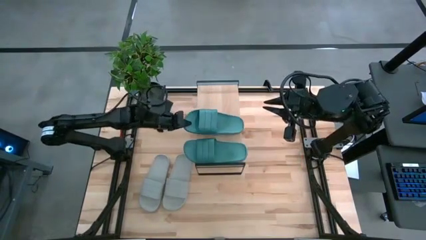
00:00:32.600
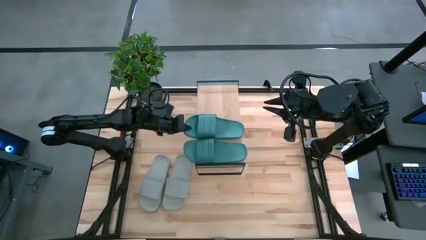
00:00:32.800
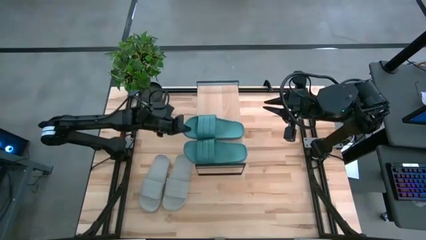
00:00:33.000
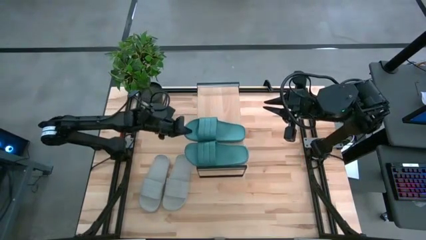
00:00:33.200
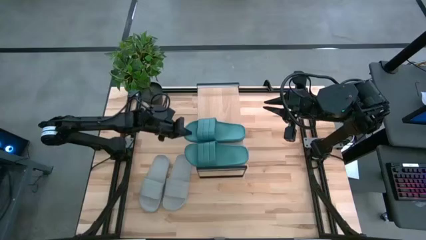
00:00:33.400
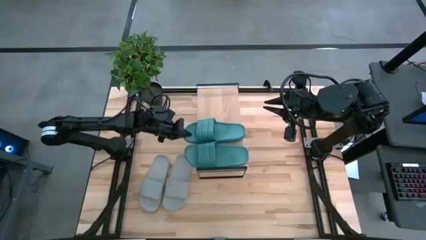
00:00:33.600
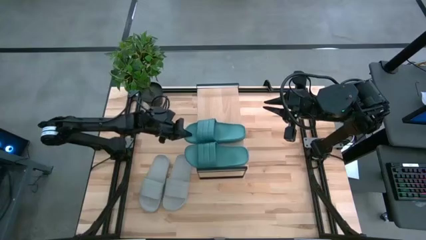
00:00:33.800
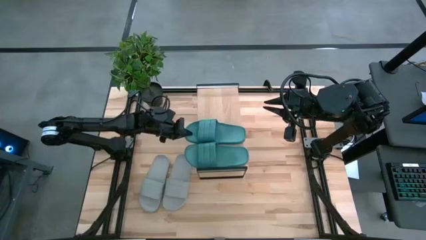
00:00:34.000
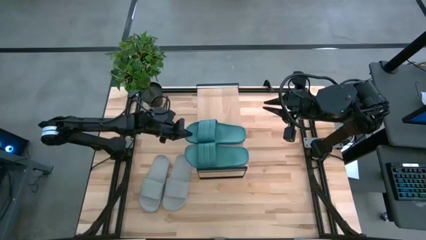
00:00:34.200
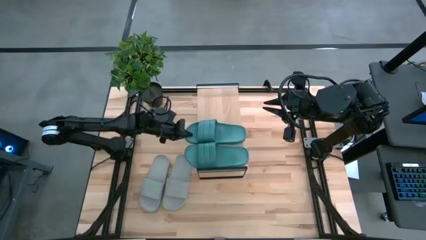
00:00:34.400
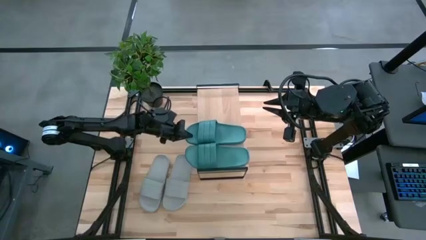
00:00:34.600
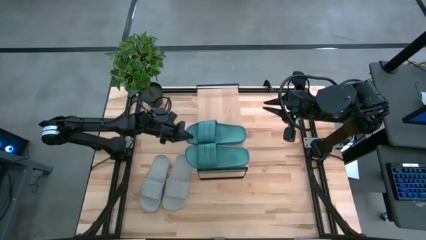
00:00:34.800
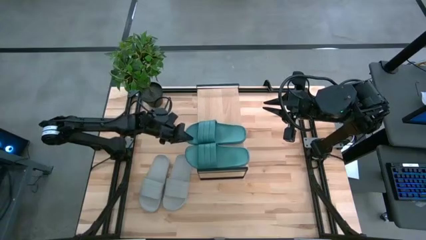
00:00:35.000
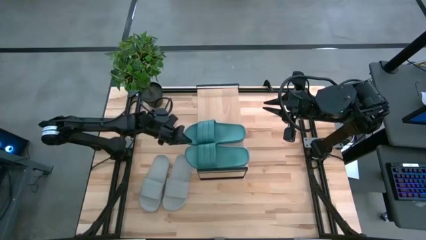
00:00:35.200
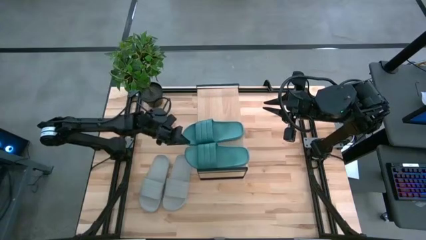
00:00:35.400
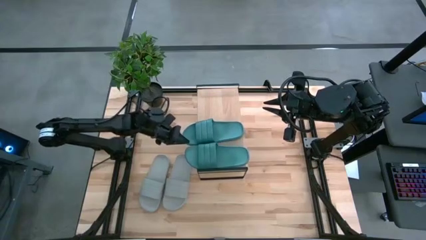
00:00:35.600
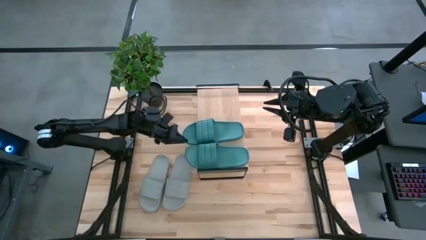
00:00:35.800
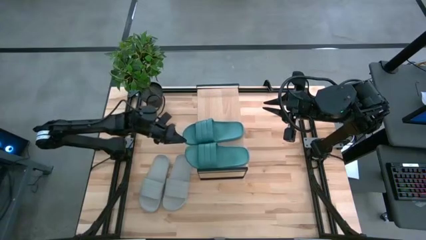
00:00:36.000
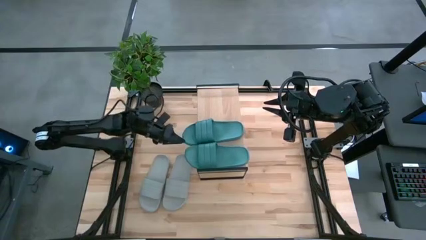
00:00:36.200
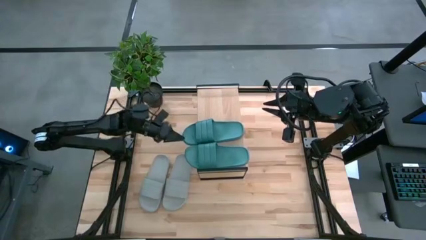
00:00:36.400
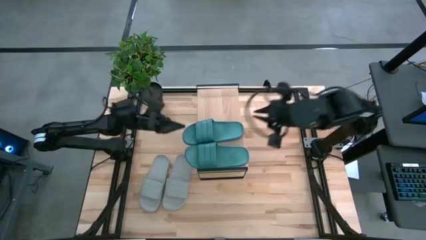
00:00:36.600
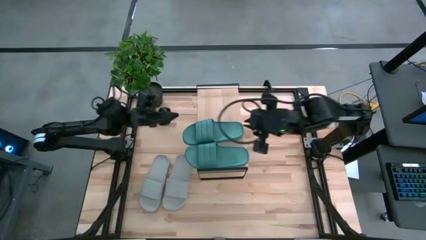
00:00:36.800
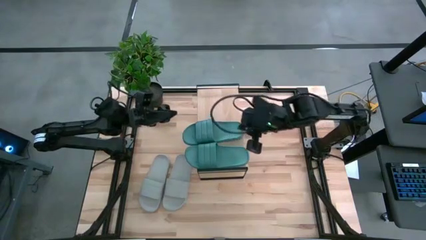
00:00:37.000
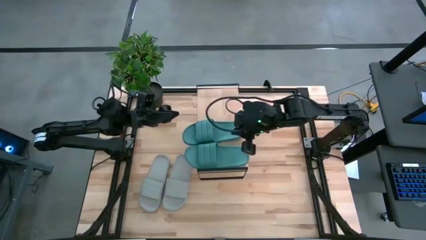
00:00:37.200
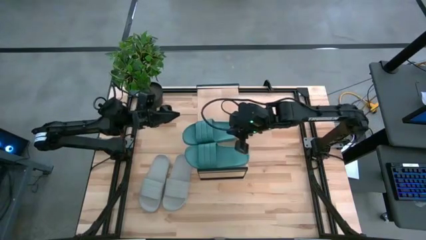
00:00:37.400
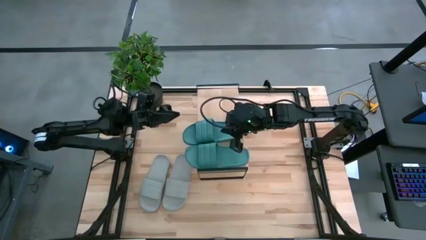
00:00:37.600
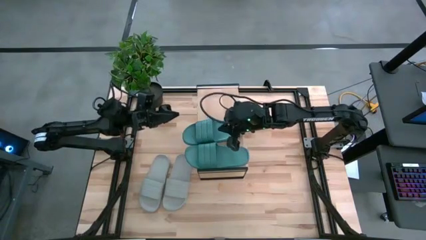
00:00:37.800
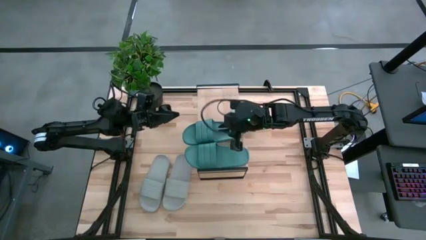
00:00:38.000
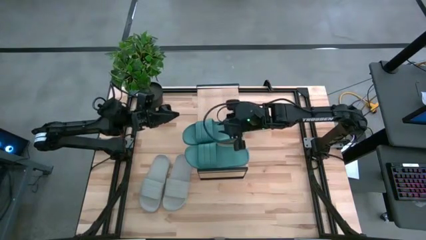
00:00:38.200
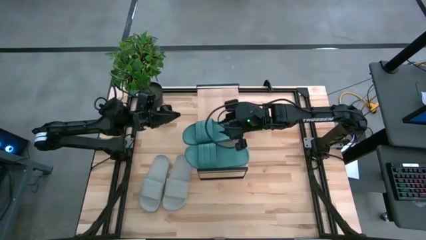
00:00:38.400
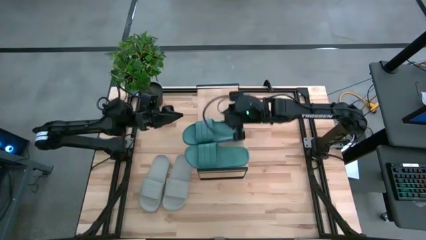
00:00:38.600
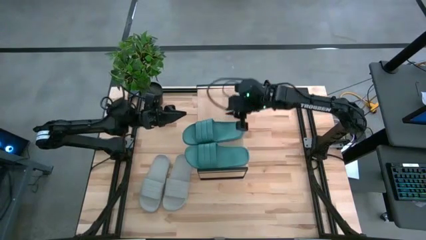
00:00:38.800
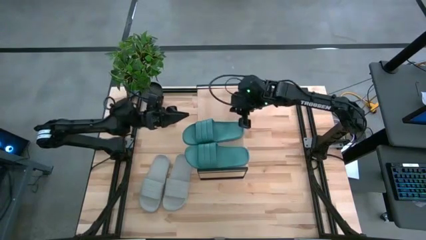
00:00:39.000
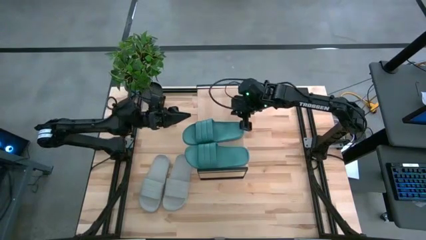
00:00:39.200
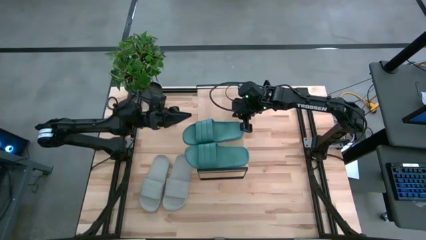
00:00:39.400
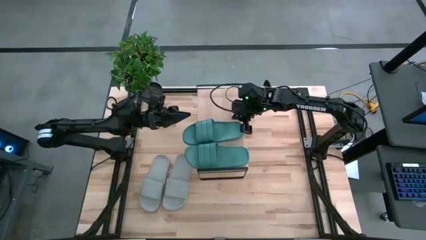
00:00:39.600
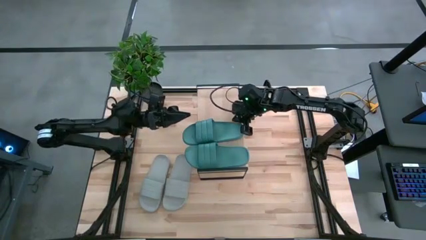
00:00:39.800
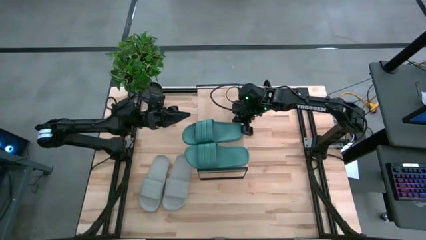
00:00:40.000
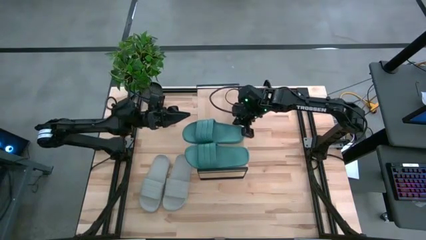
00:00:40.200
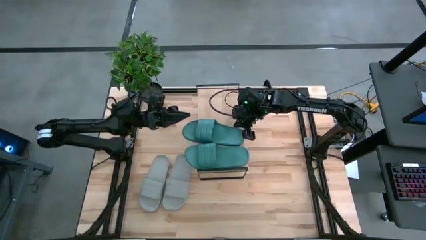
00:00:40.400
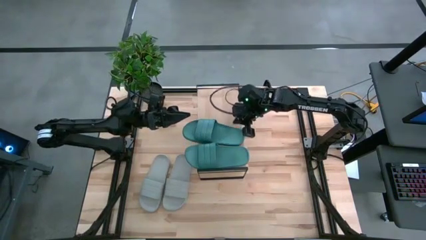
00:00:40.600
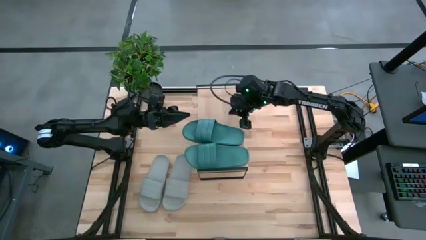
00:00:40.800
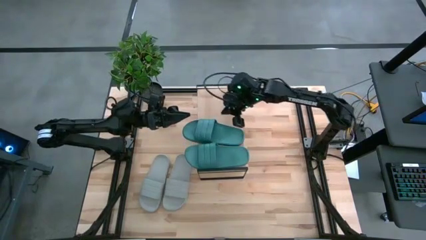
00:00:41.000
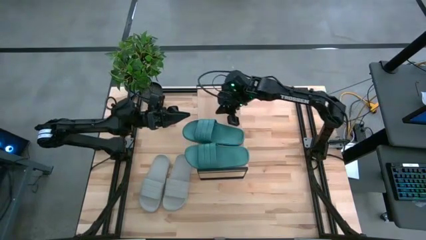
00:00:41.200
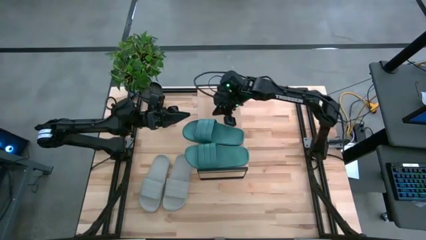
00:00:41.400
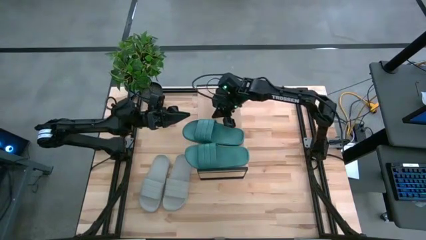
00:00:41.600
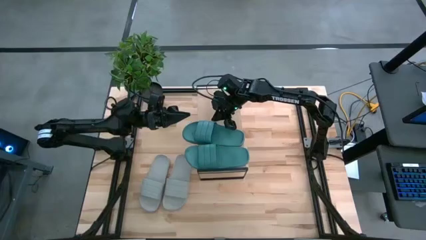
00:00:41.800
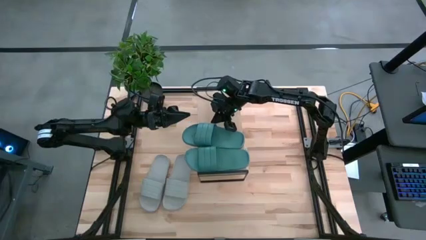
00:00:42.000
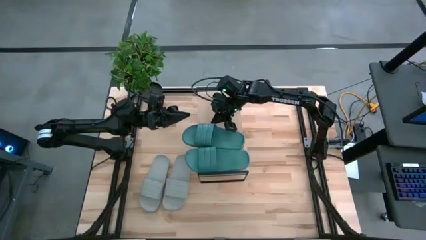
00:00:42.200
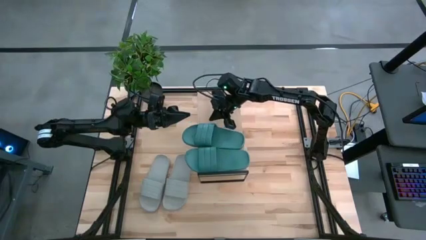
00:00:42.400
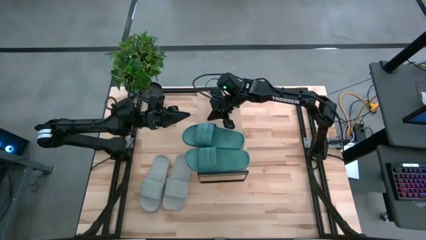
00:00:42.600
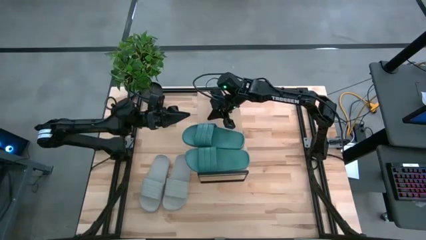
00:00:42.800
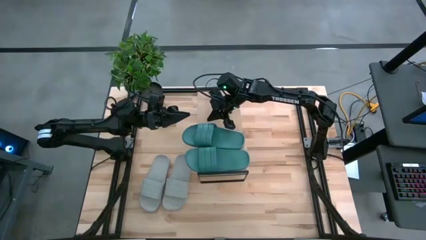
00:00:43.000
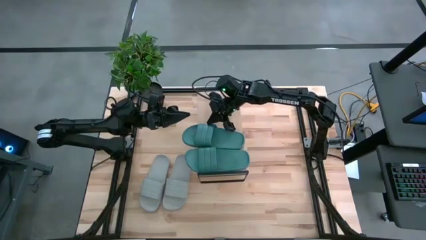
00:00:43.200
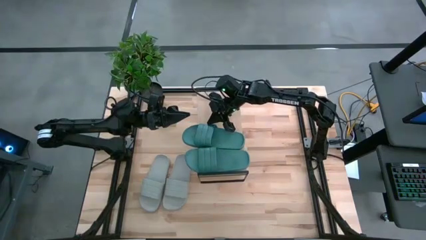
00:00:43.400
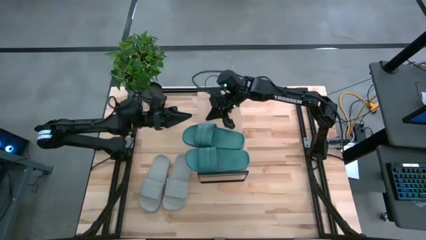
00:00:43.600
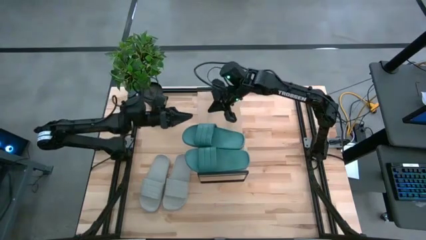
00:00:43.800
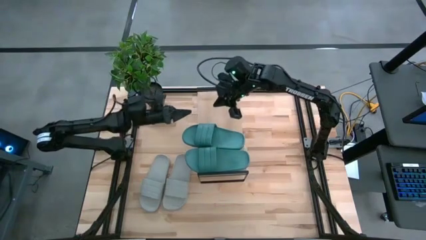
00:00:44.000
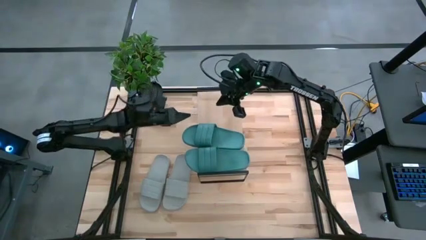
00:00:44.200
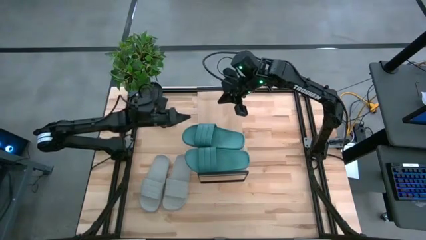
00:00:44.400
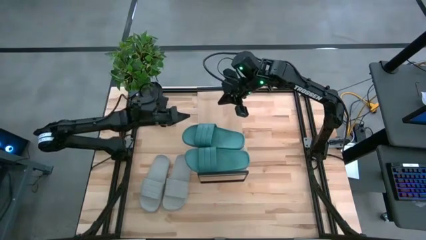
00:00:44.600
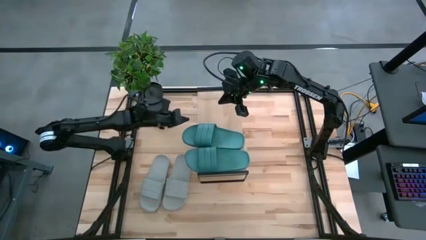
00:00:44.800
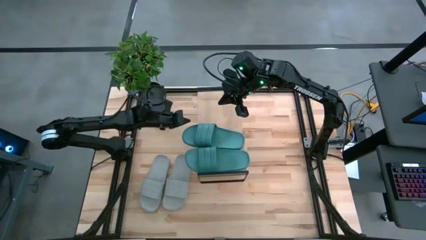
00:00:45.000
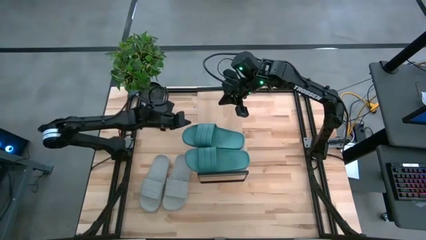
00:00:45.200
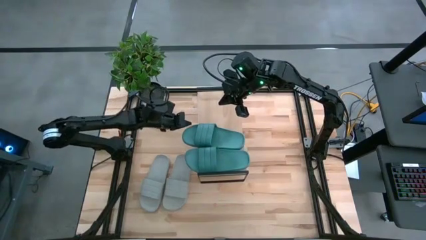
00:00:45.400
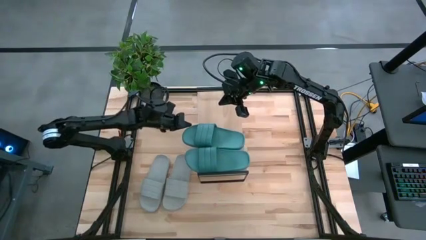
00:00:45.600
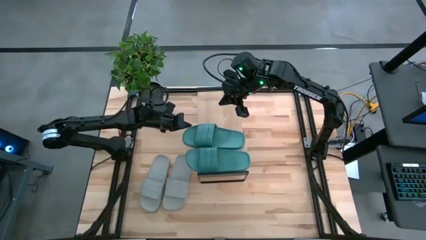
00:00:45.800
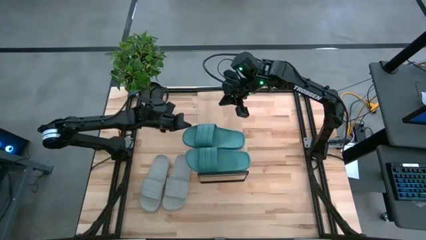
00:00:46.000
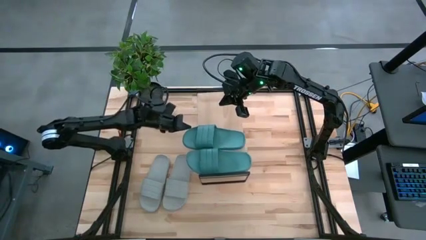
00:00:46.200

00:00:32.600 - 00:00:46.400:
Task: Pick and place slides into the shelf
Put the green slipper on the shelf
